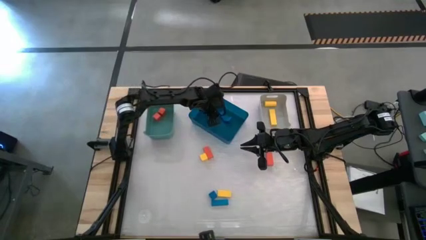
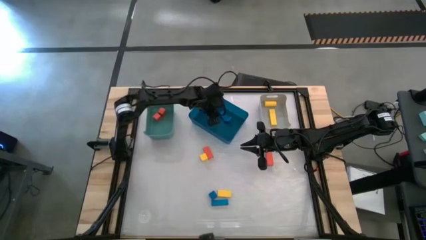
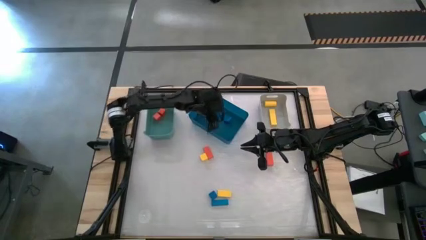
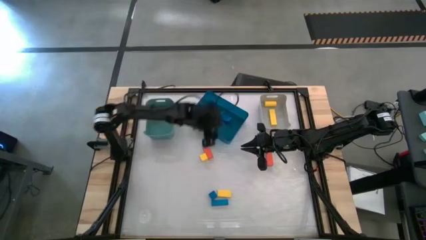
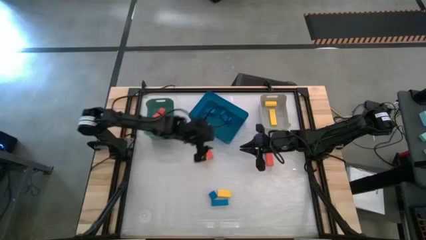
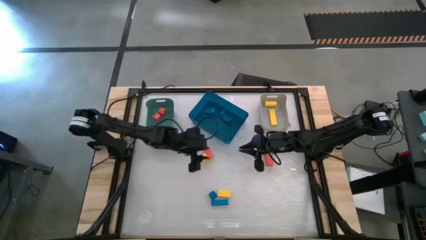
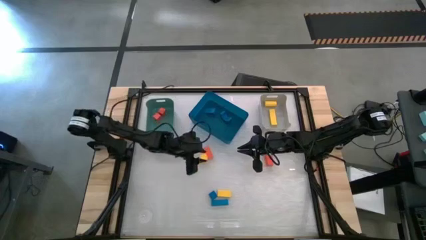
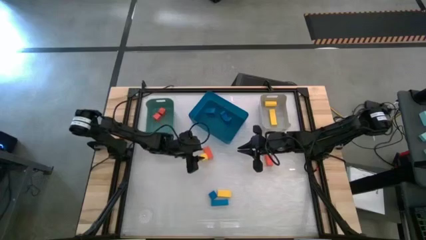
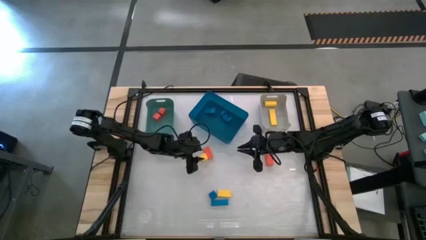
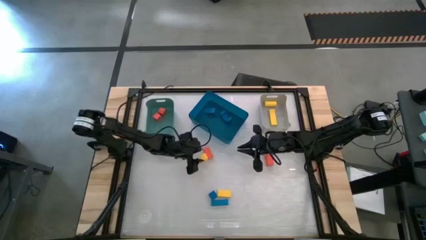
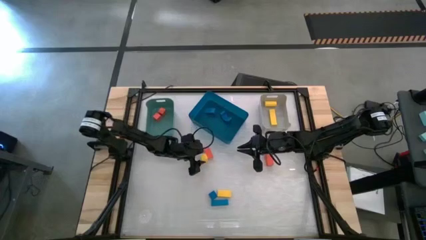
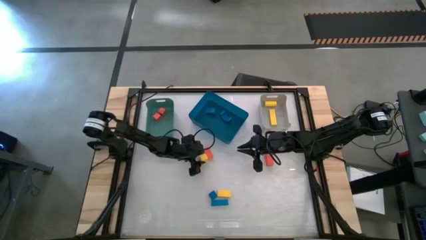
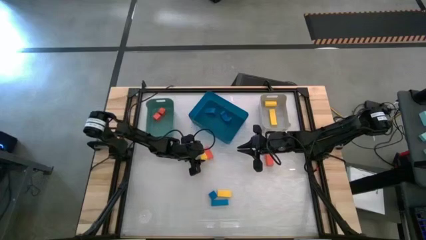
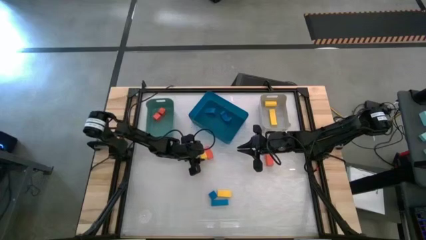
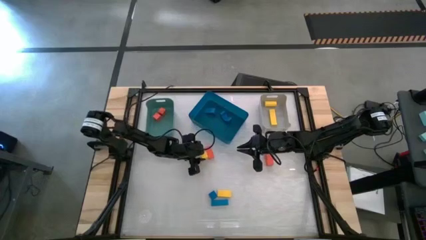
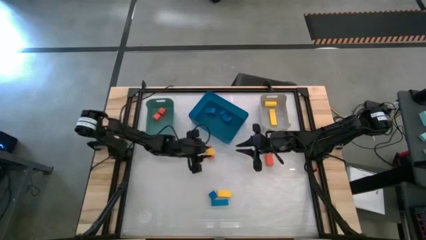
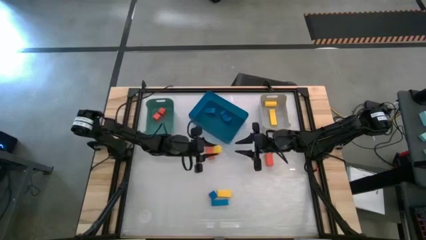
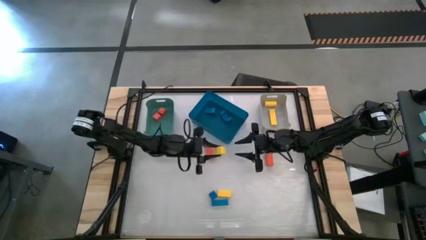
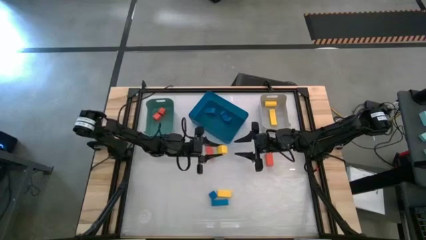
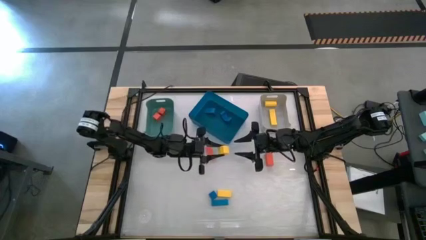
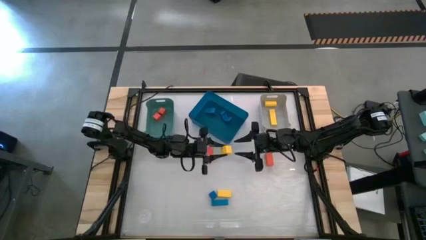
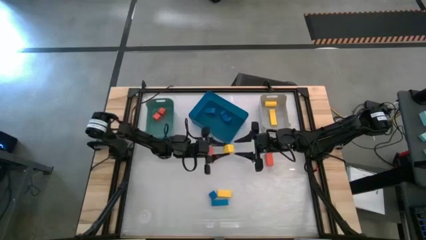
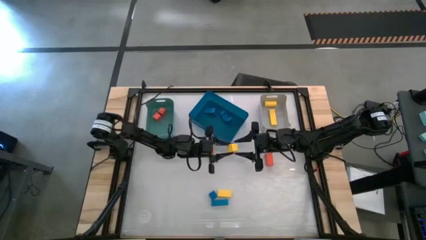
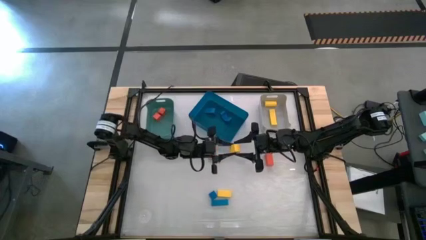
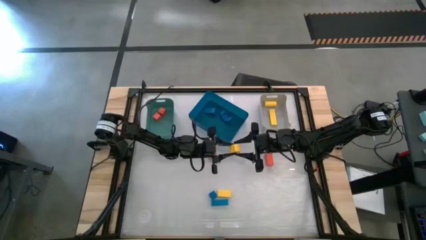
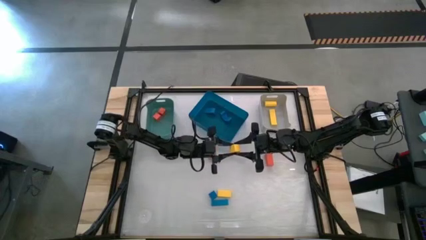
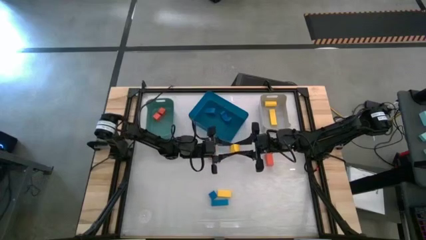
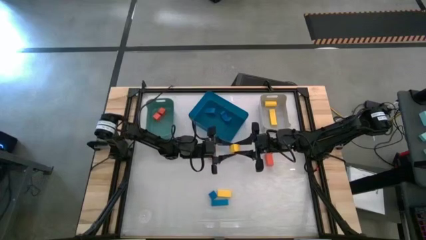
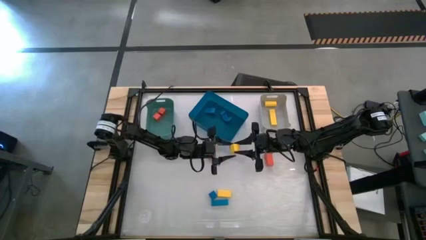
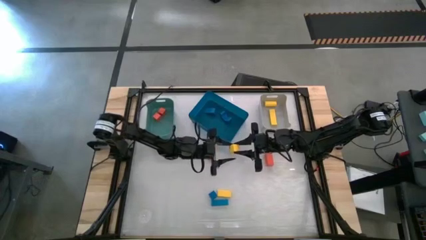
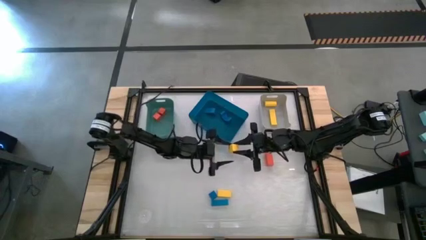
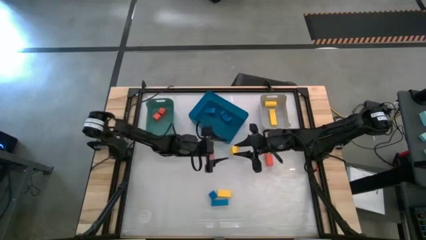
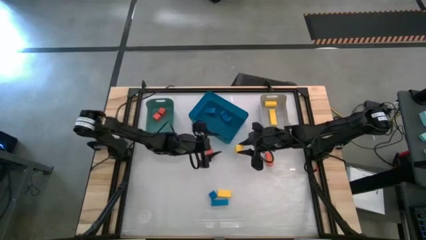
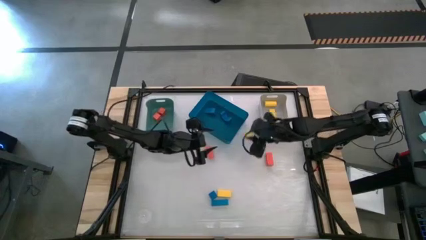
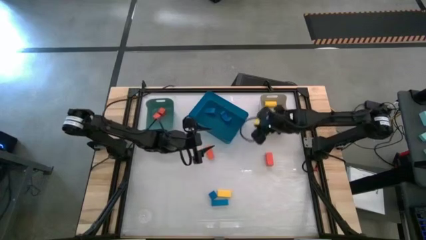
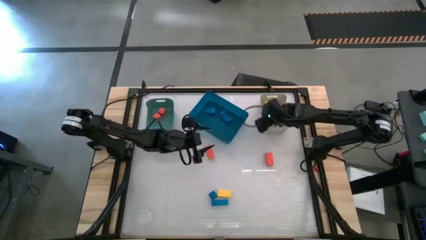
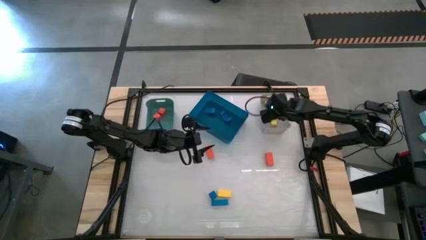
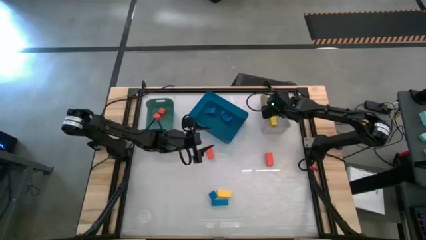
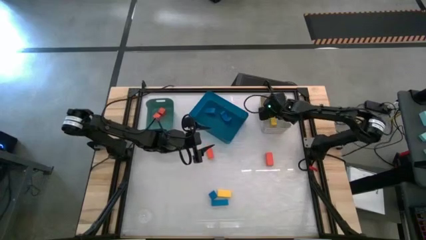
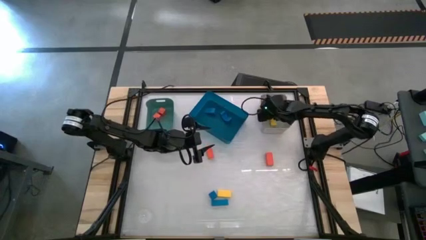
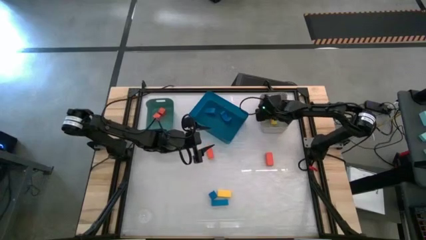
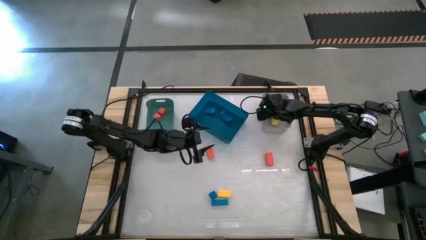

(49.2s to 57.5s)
Task: Sort & place blocks by color
Put the yellow block into the gray bin

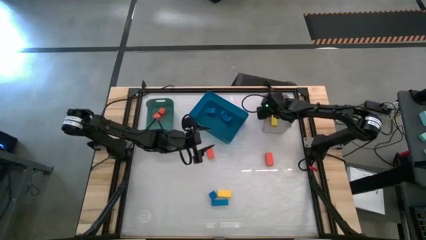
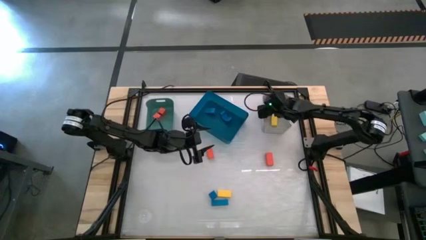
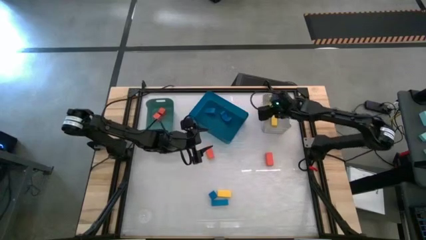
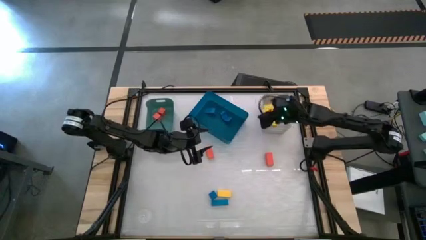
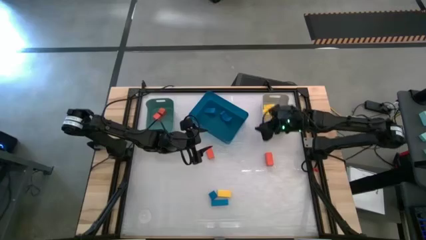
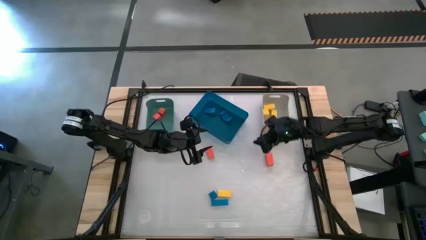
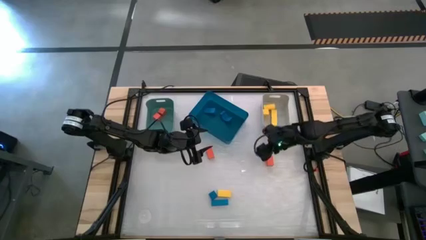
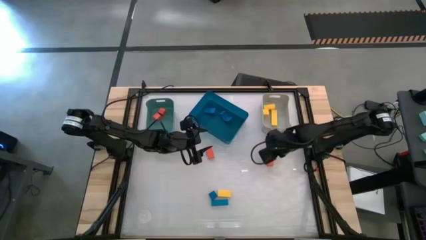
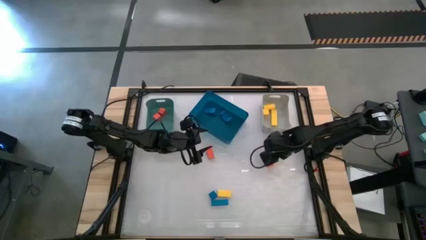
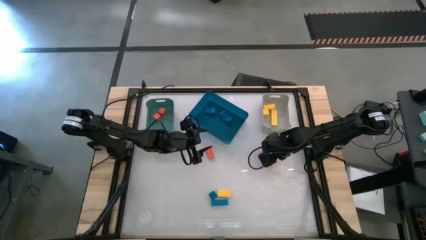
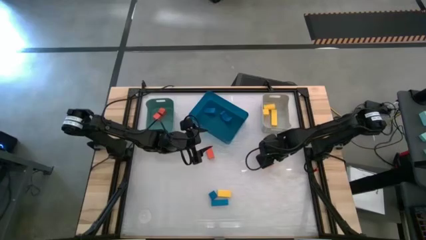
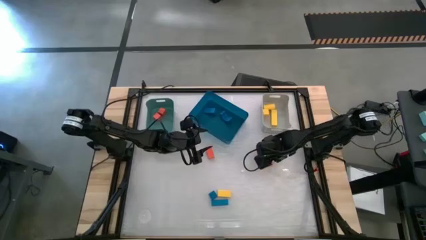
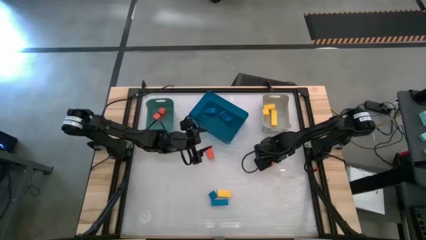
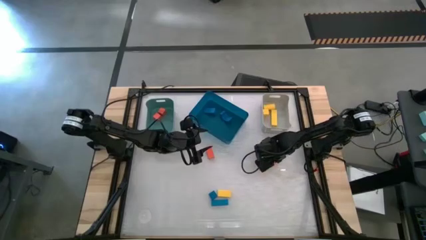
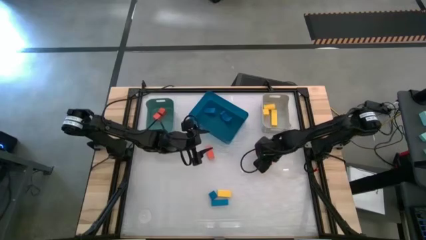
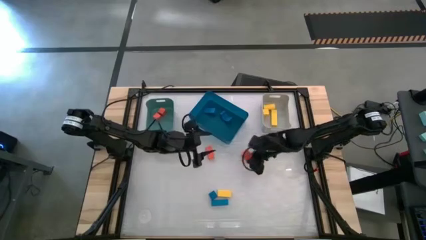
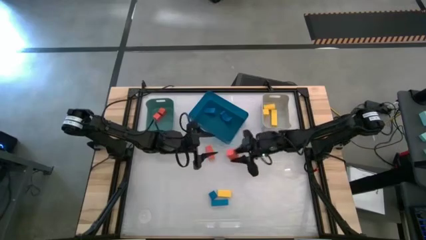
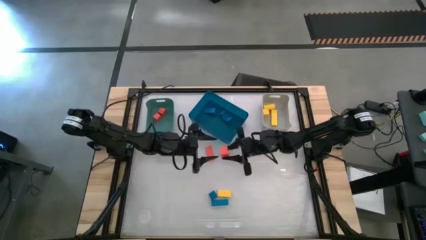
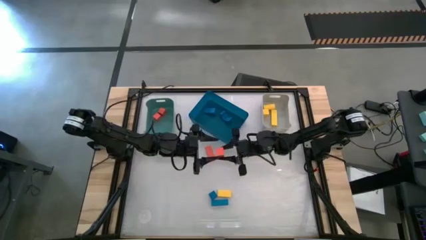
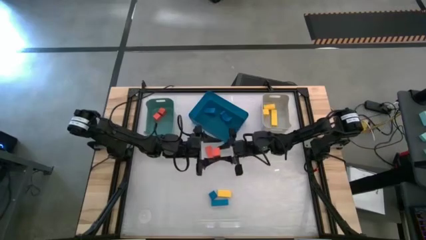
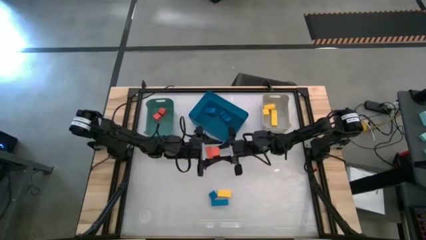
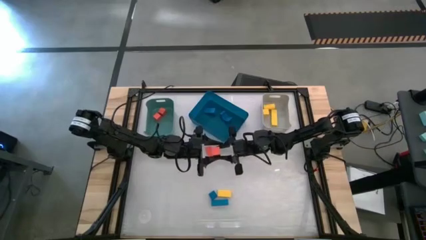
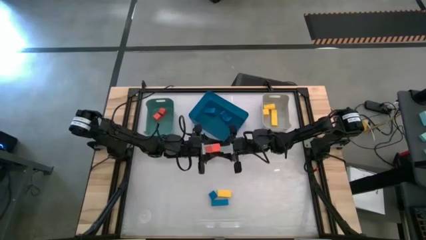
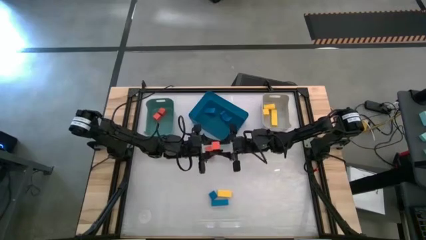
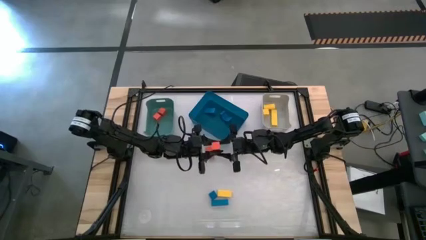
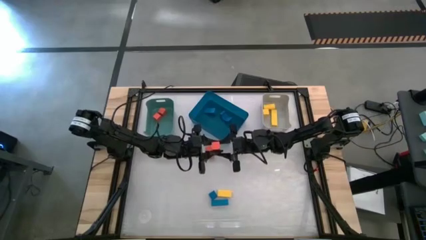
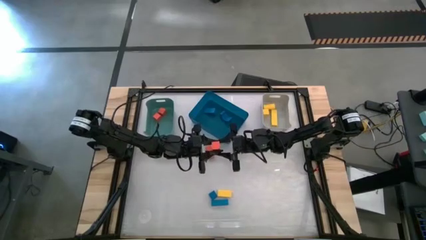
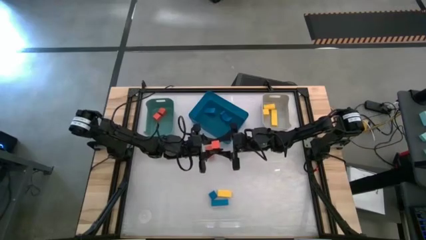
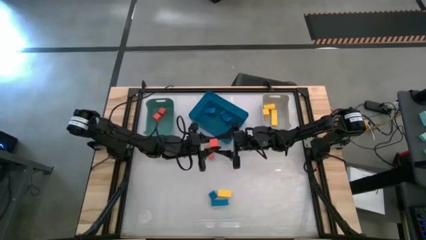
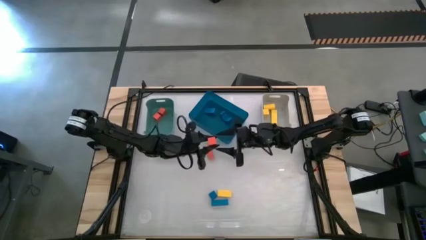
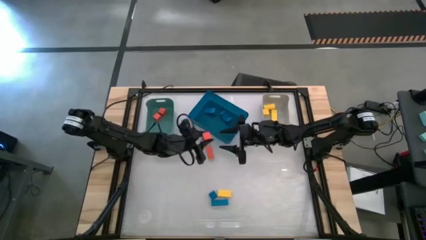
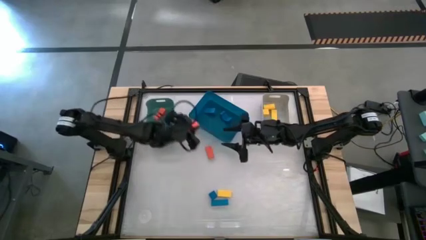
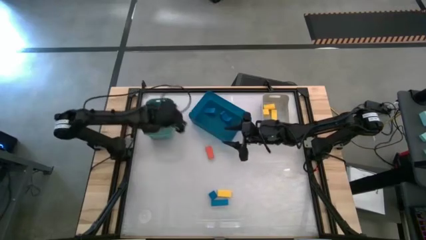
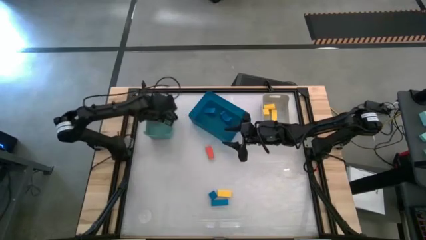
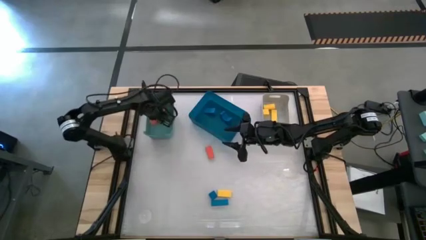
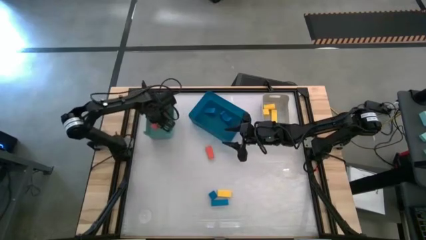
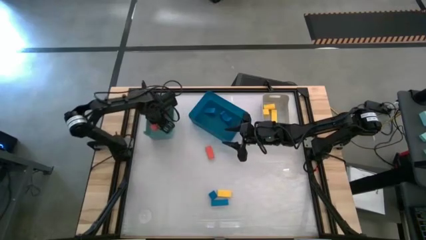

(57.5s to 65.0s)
Put the orange block into the green bin

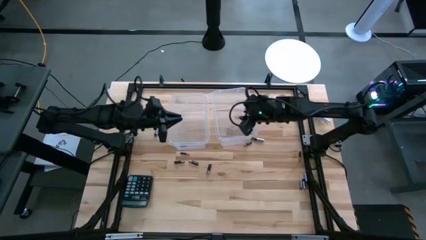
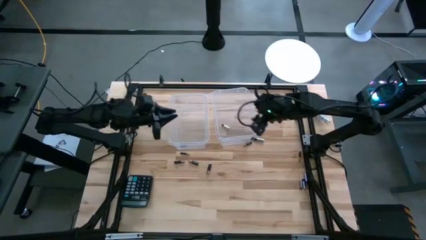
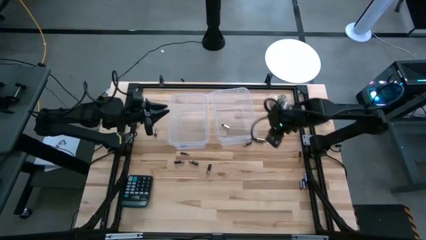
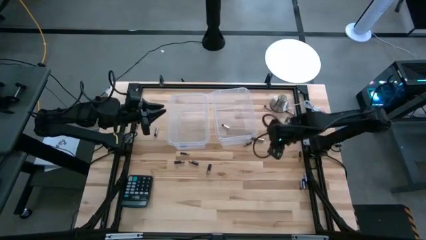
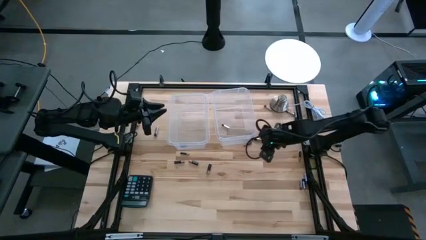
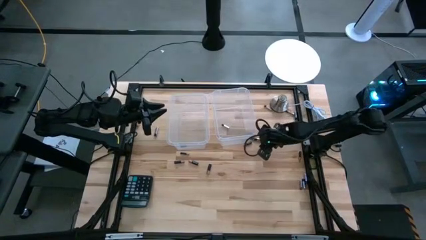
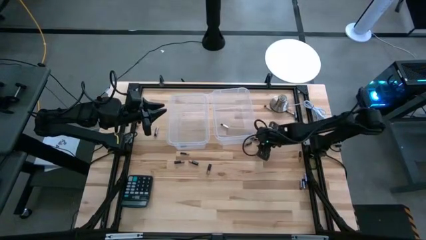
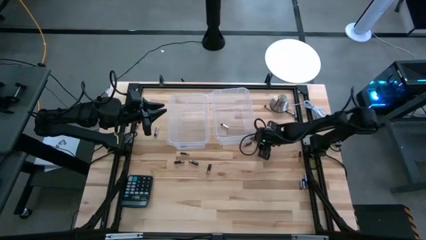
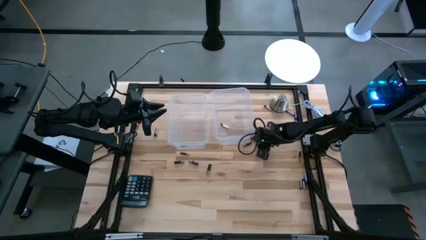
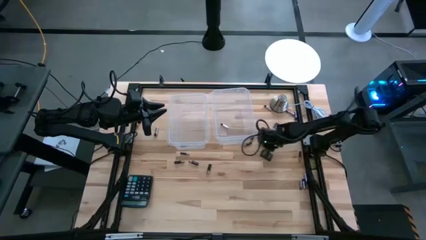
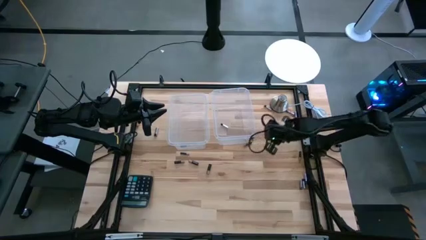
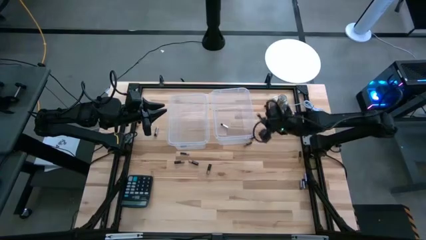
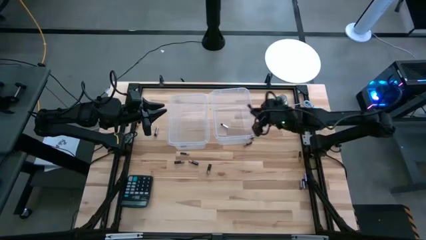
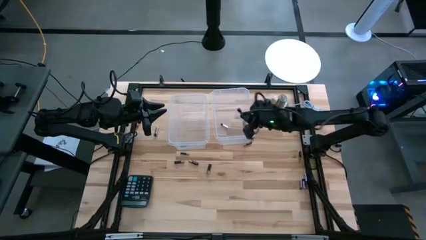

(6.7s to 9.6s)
Task: Sort batteries
Put silver battery into the right transparent bin
